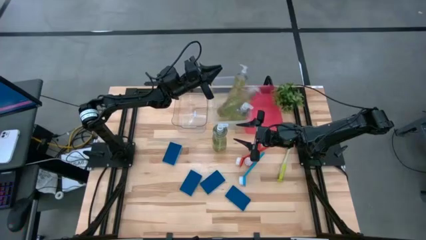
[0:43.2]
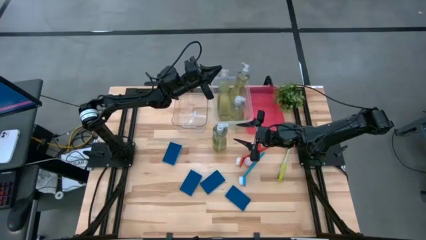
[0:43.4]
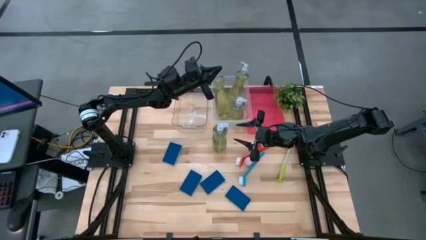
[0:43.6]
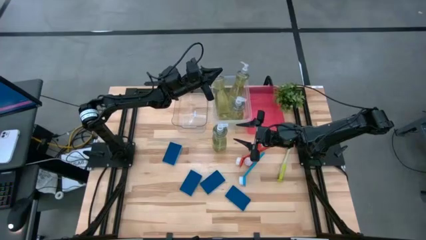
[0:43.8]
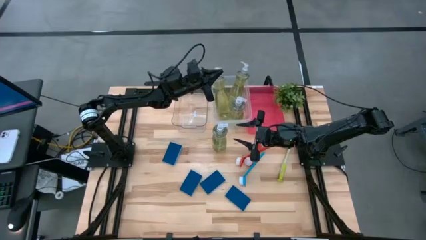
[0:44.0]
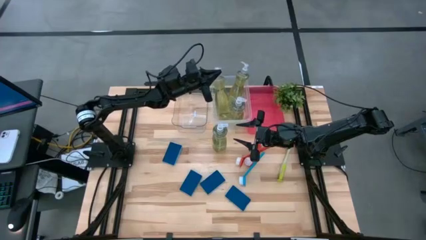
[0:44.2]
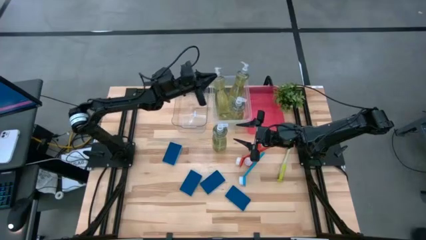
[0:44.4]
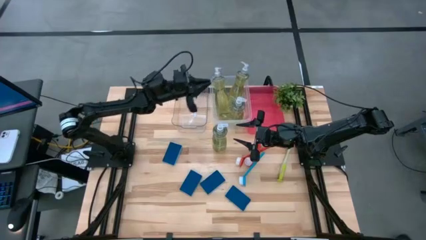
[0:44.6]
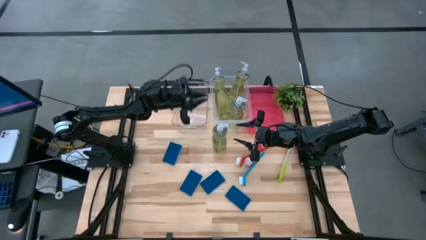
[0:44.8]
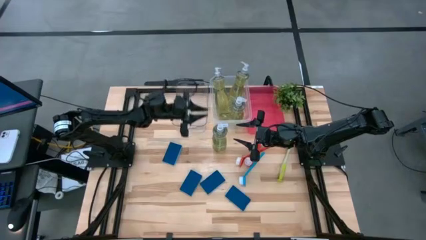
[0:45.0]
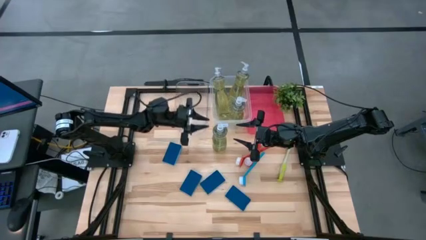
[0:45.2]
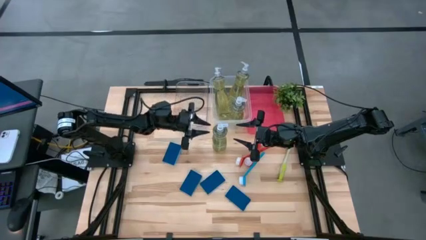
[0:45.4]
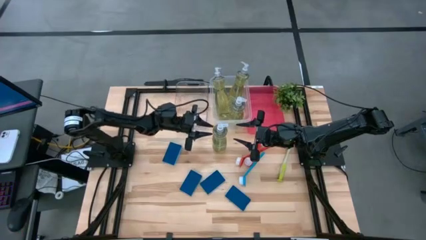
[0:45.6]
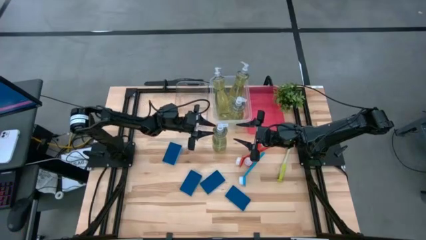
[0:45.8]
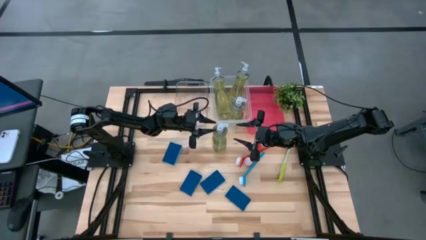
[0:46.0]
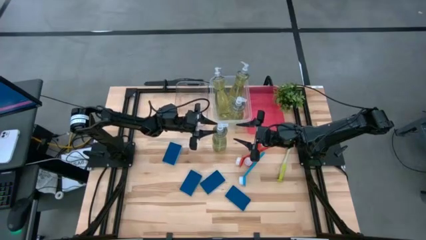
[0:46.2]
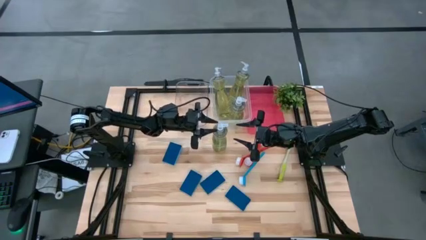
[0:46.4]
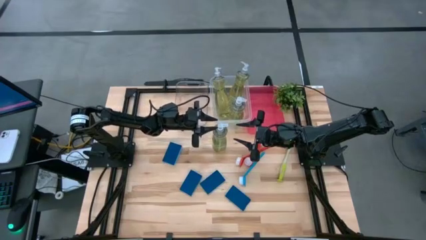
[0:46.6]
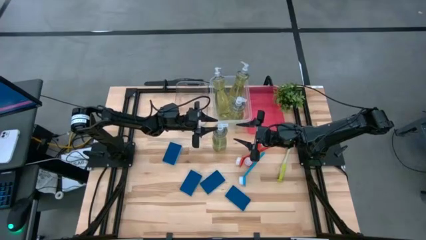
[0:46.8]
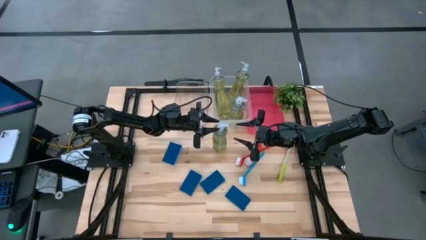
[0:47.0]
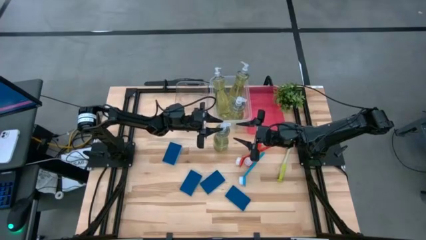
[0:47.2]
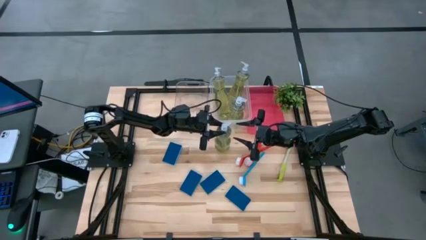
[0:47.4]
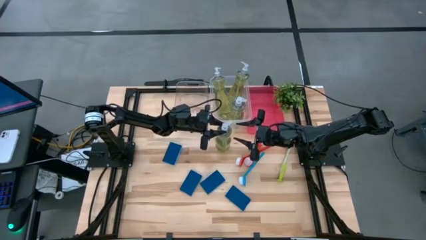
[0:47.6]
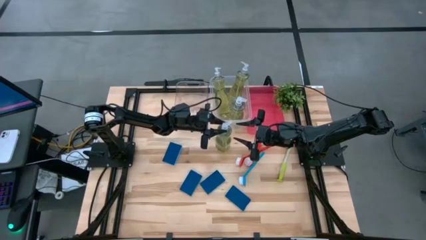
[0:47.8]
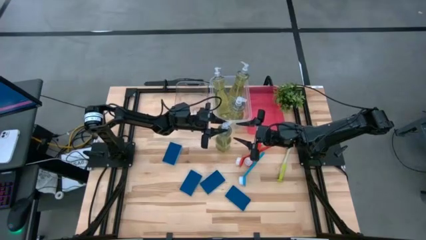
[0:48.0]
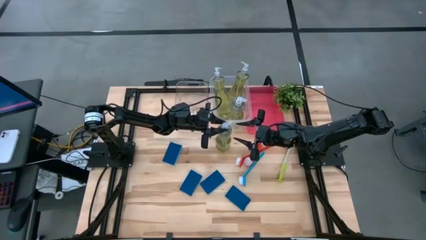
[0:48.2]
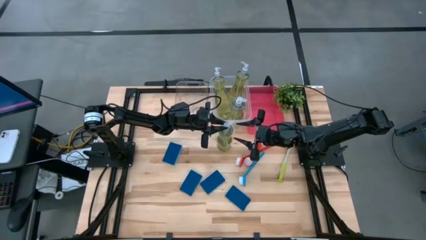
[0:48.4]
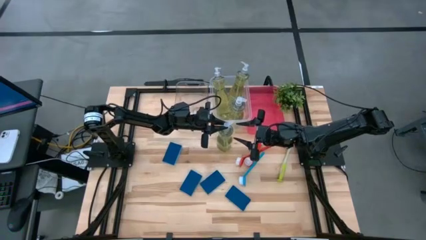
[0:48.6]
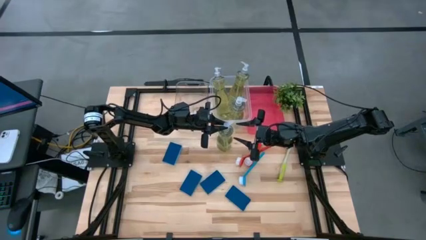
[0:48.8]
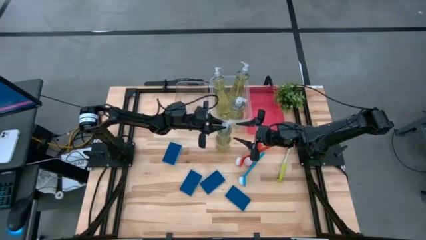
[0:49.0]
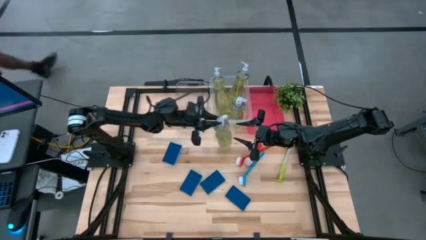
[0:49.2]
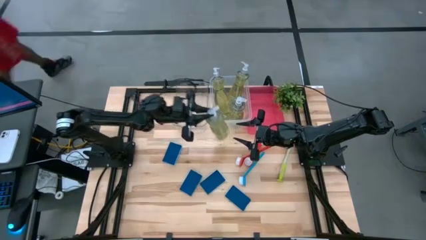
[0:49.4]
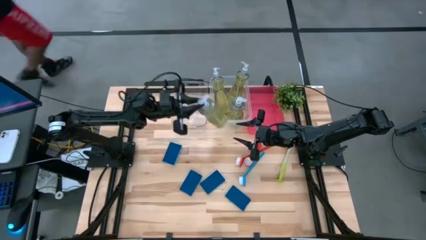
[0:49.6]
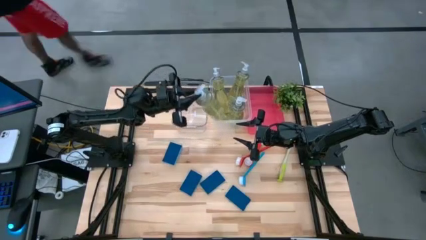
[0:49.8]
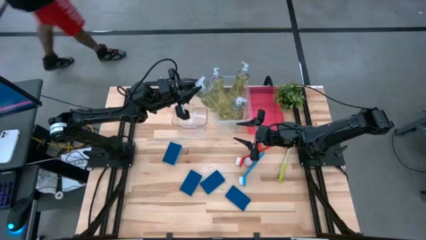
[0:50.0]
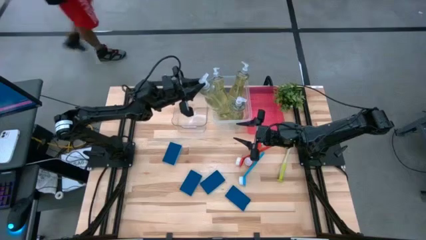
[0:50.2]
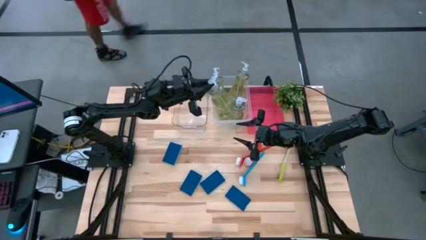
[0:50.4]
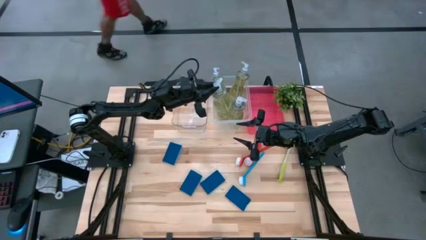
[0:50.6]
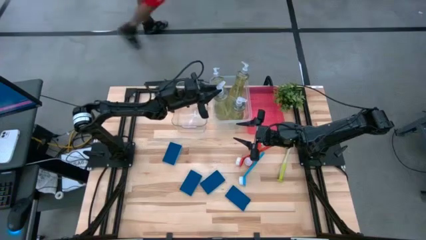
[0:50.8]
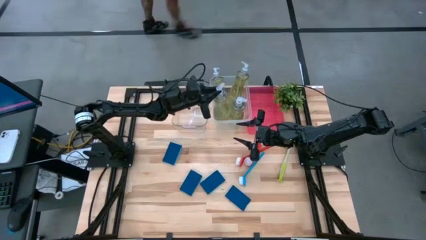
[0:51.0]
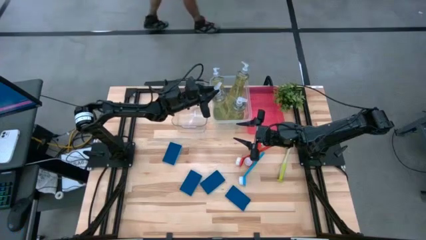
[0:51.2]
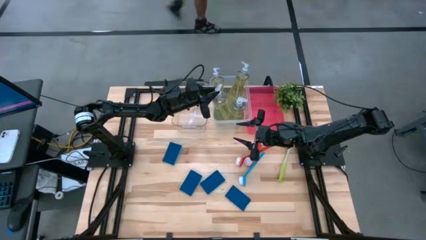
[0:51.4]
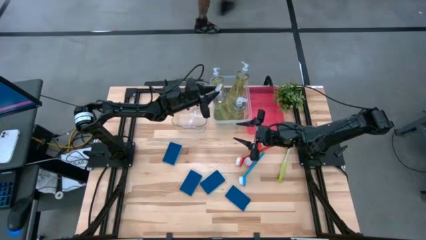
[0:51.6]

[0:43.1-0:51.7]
Task: Pick & Place Kitchen Sink Supplies
Put the transparent soap dispenser into the right transparent bin

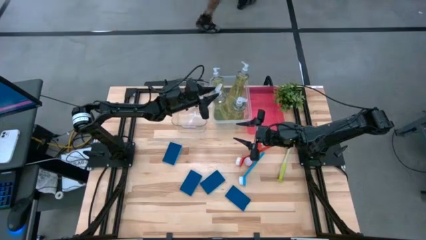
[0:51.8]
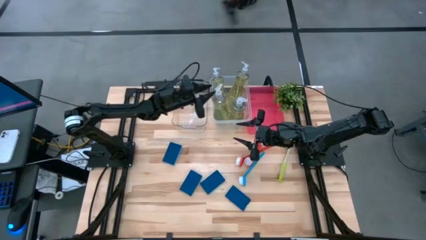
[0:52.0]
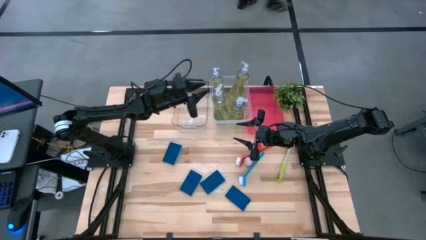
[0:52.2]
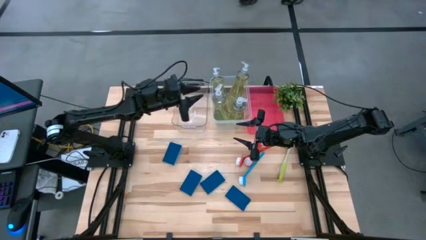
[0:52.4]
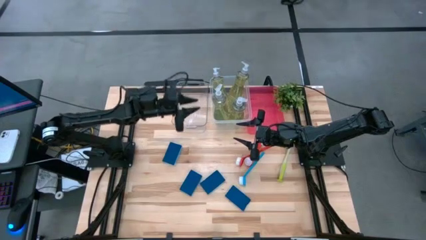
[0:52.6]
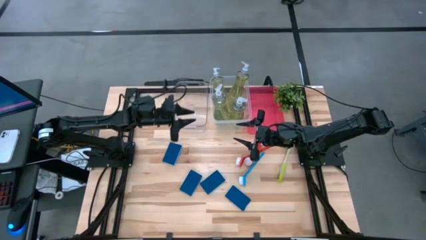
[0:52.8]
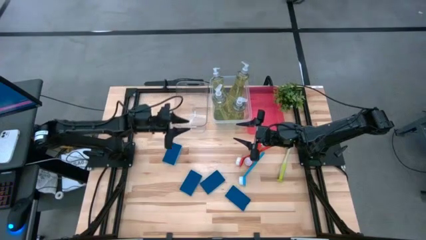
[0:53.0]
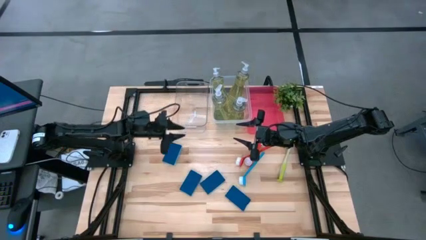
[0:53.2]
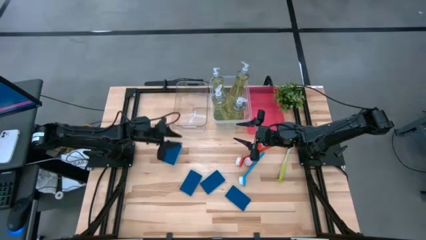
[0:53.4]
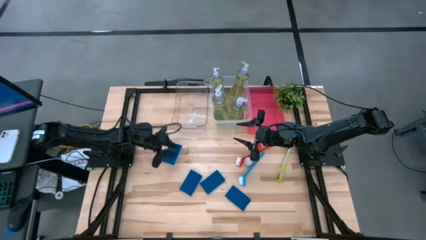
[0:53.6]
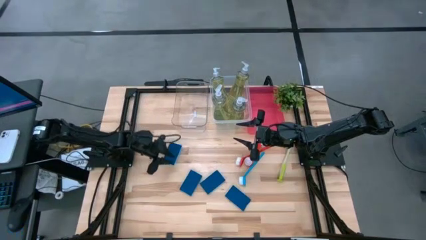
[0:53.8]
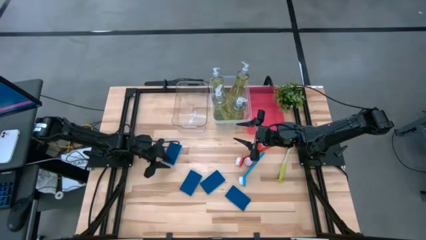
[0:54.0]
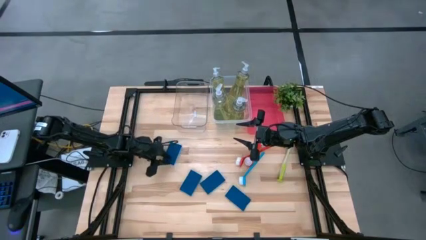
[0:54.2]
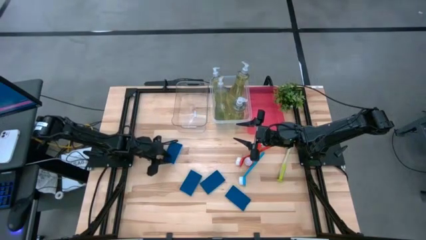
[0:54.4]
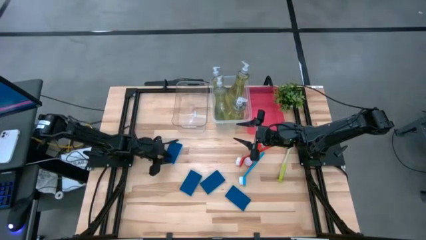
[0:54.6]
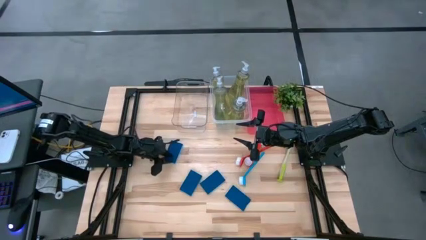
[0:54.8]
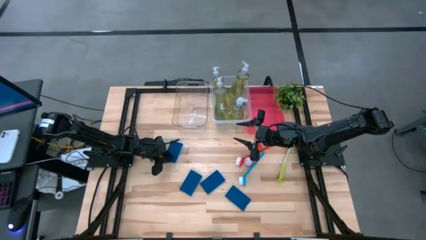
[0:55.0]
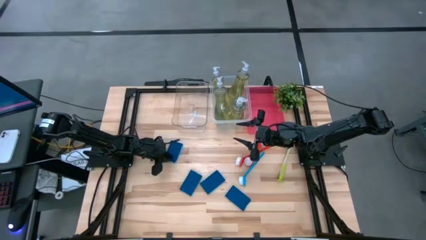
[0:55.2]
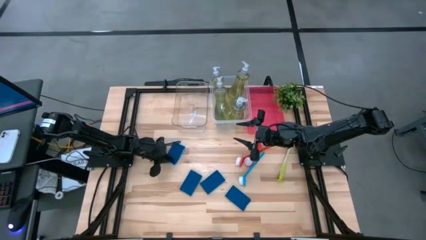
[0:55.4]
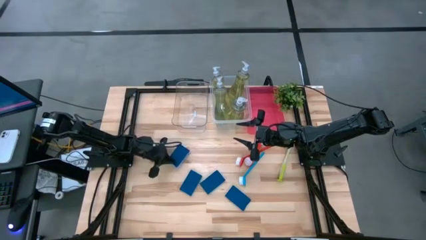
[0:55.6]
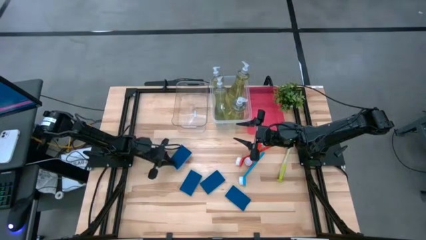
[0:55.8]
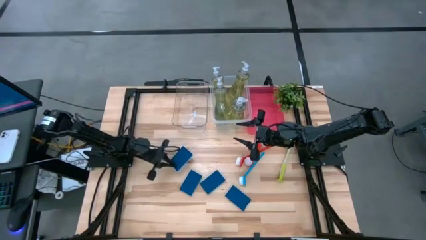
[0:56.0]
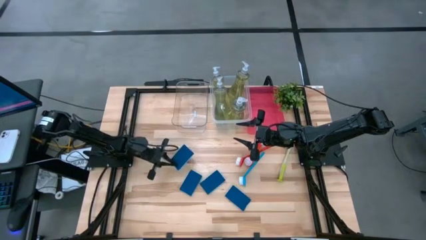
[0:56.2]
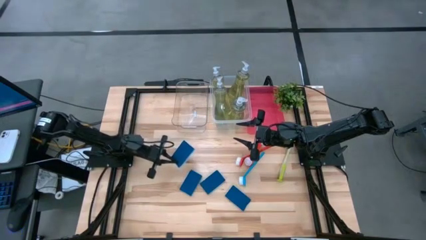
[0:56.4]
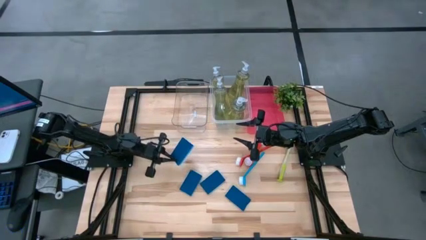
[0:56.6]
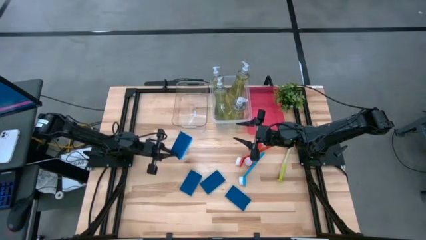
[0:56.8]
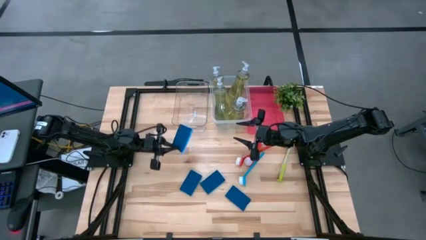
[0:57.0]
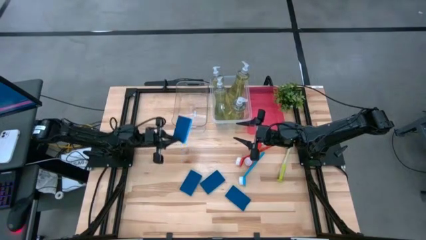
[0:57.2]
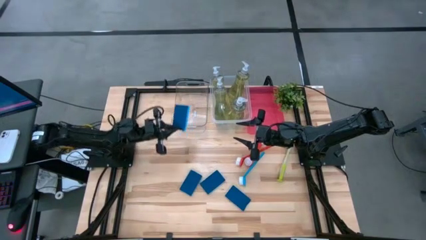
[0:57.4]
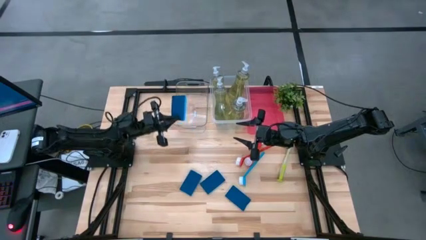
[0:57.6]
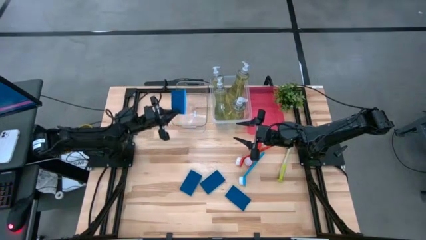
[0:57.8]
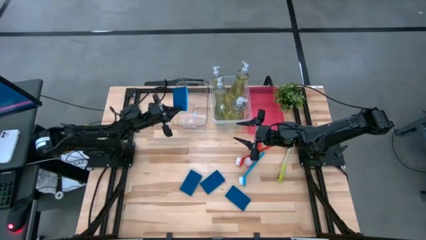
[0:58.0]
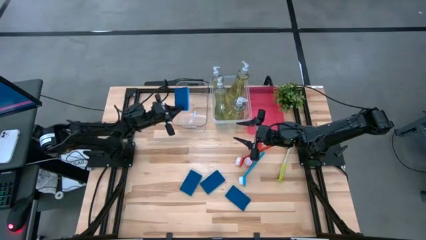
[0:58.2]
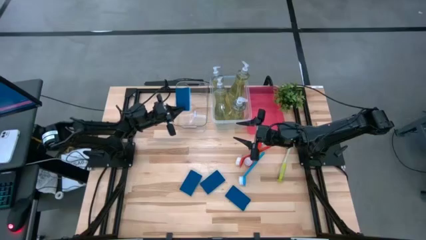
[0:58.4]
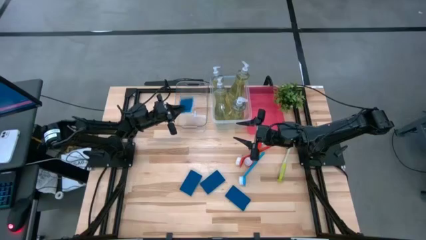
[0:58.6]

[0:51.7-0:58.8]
Put the blue sponge into the left transparent bin
